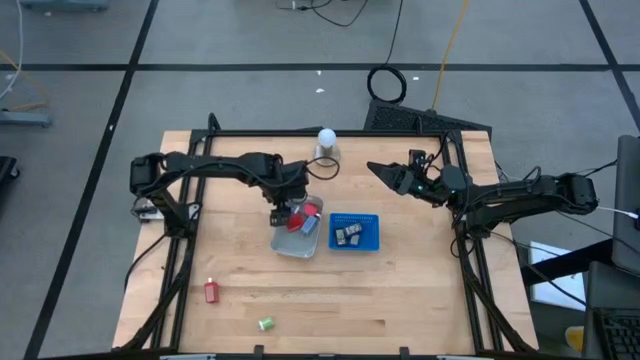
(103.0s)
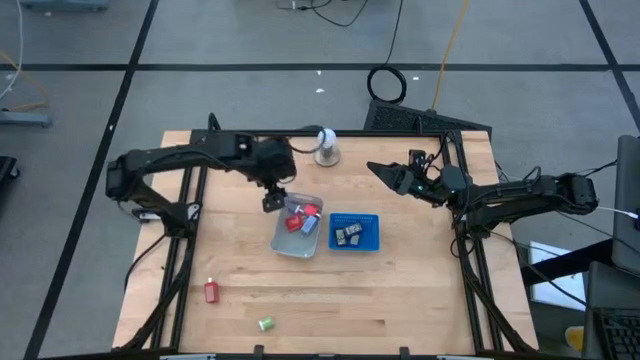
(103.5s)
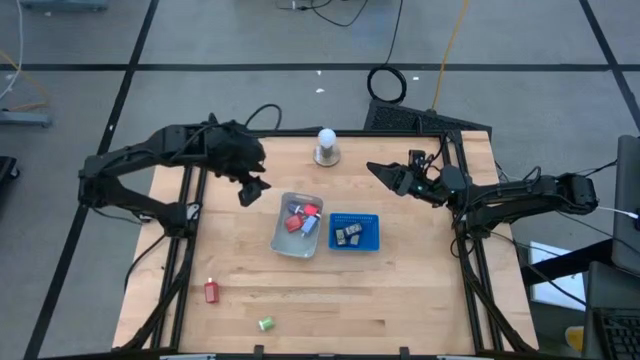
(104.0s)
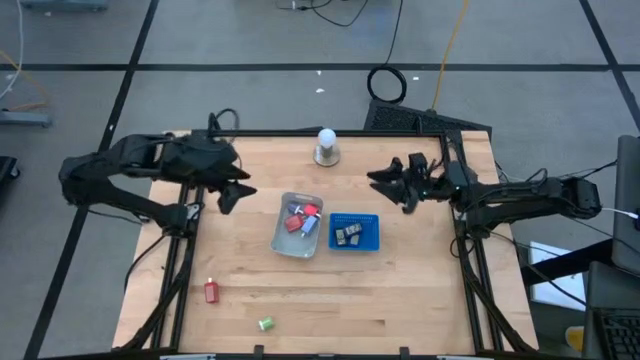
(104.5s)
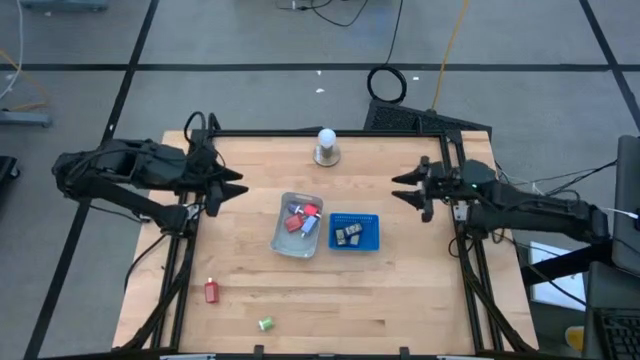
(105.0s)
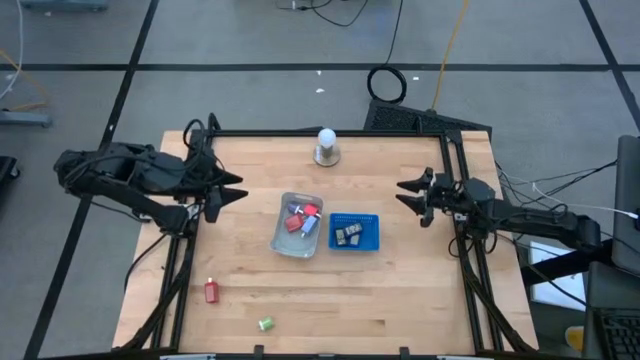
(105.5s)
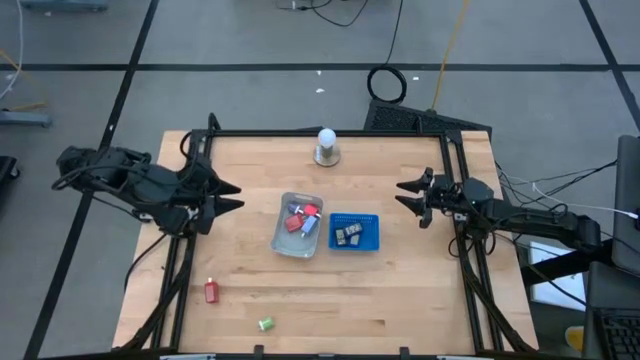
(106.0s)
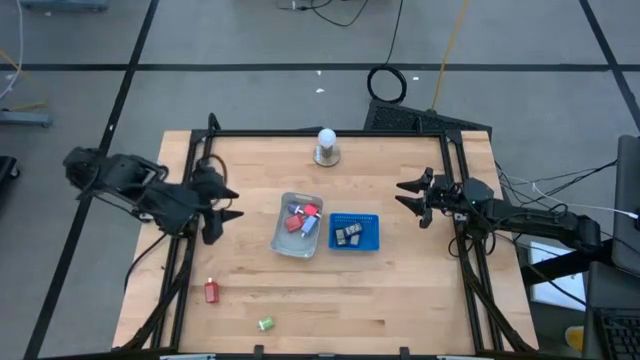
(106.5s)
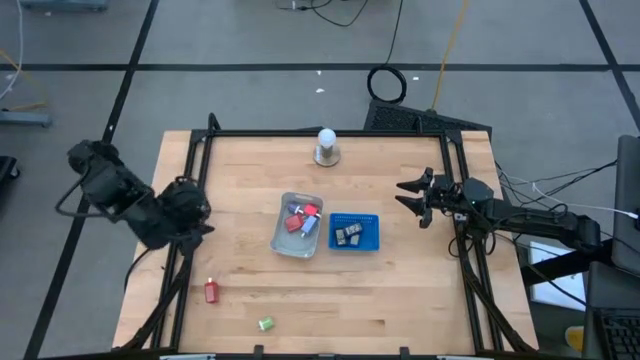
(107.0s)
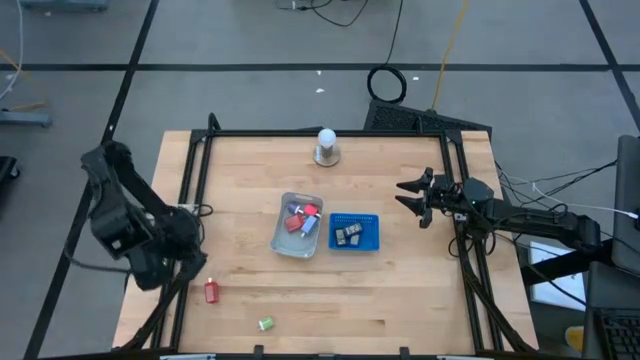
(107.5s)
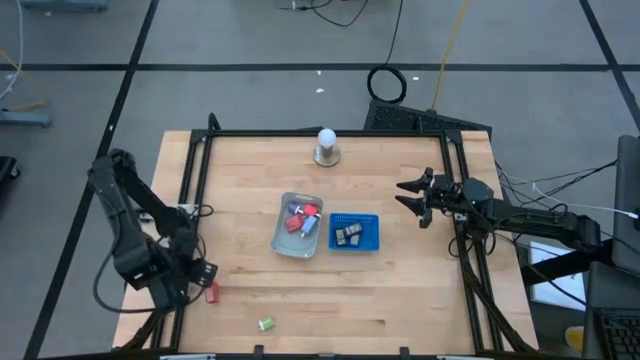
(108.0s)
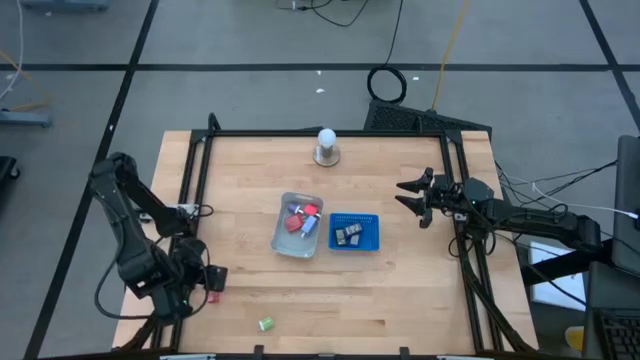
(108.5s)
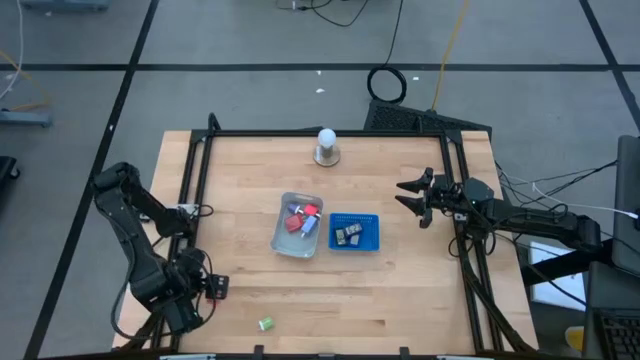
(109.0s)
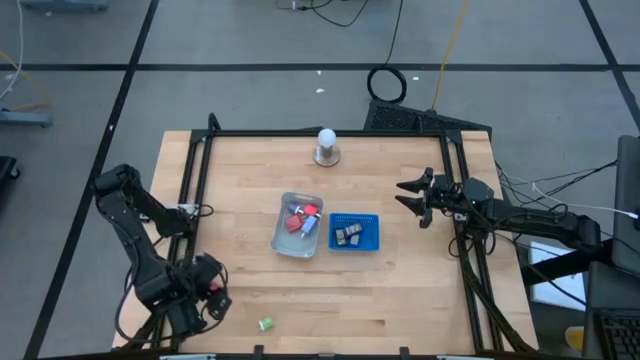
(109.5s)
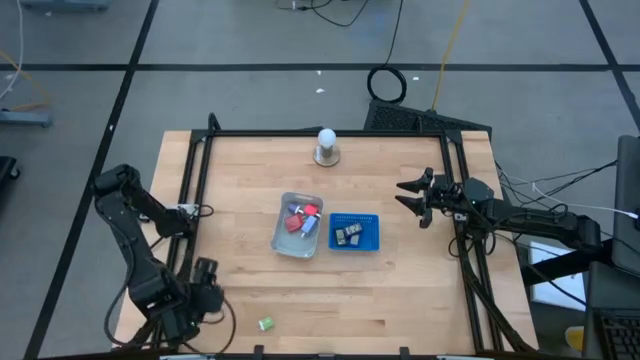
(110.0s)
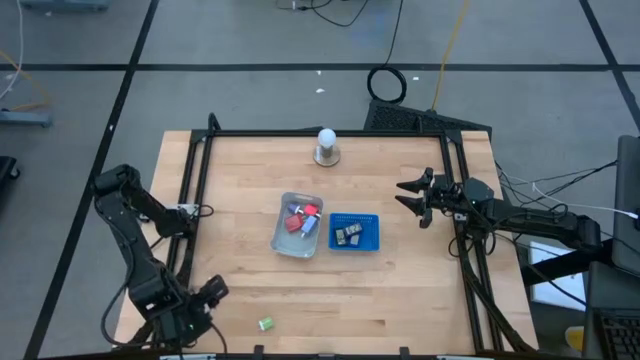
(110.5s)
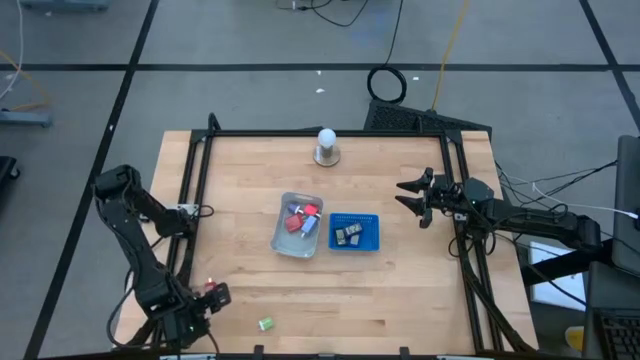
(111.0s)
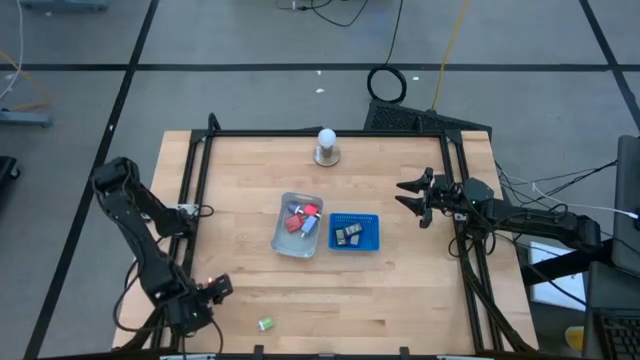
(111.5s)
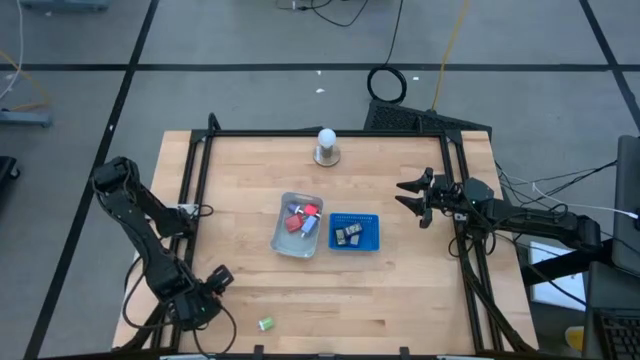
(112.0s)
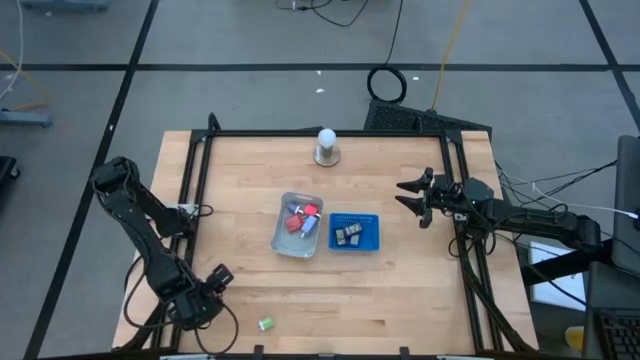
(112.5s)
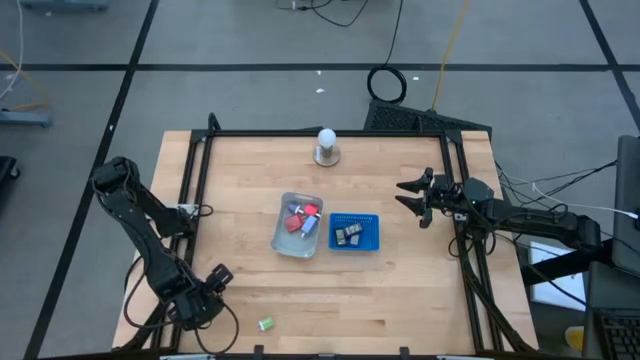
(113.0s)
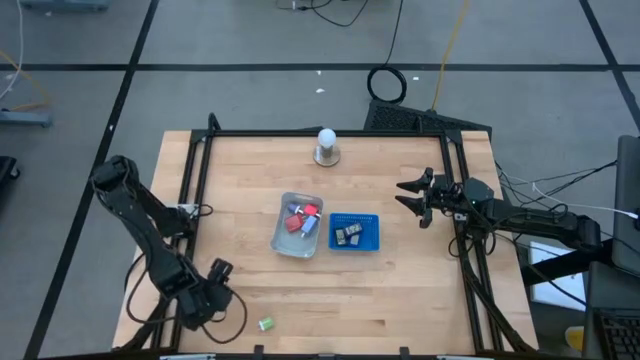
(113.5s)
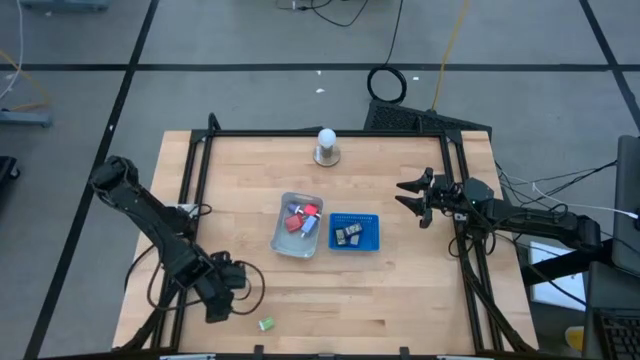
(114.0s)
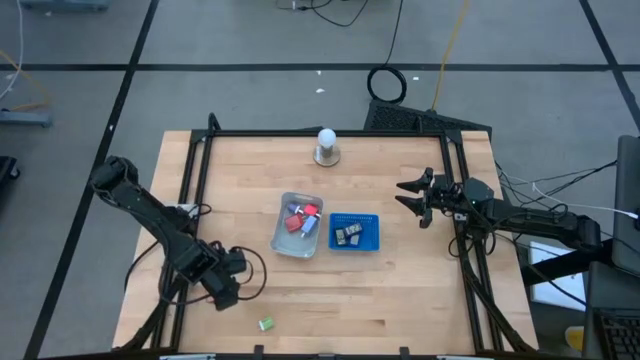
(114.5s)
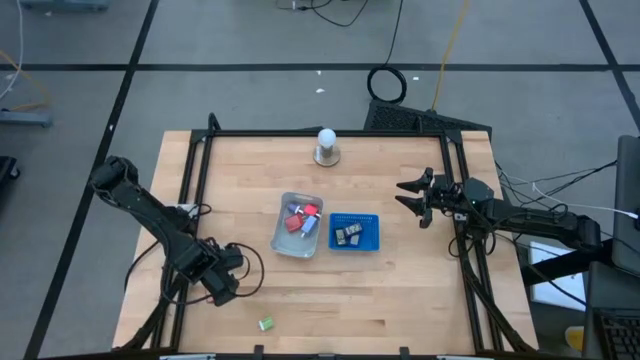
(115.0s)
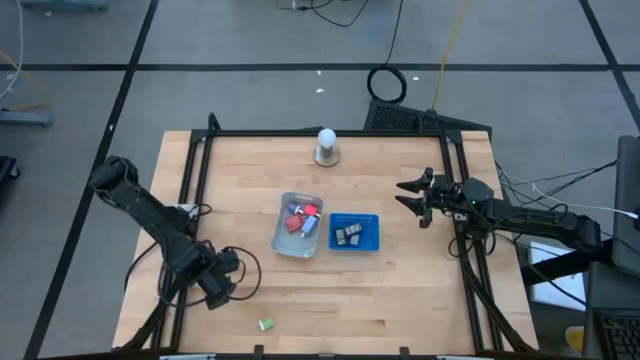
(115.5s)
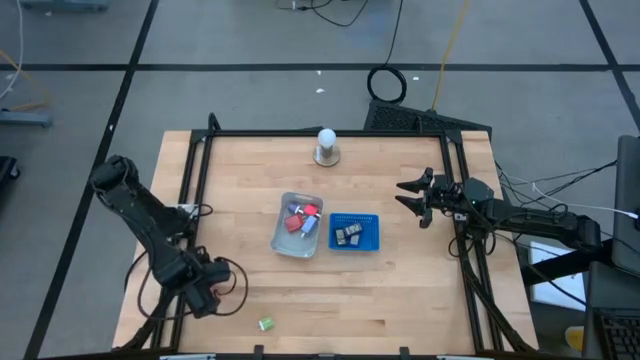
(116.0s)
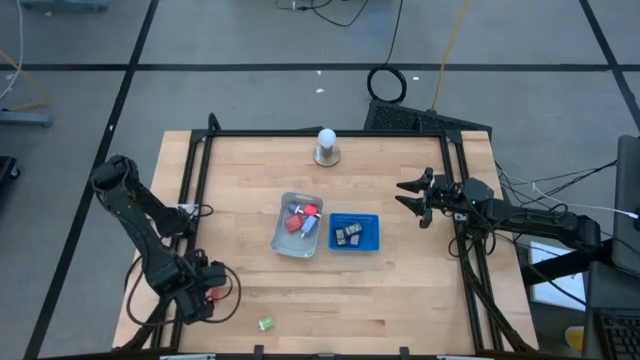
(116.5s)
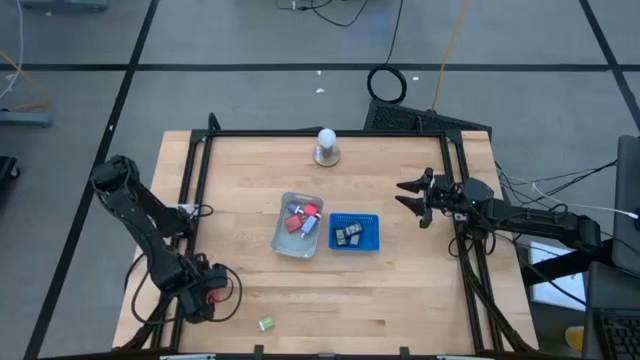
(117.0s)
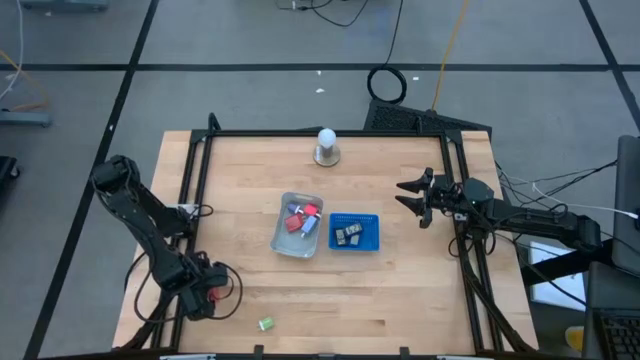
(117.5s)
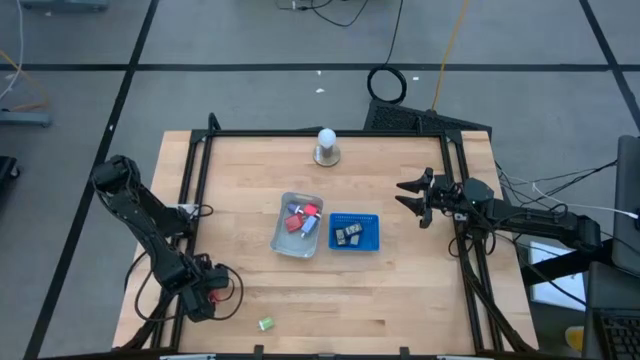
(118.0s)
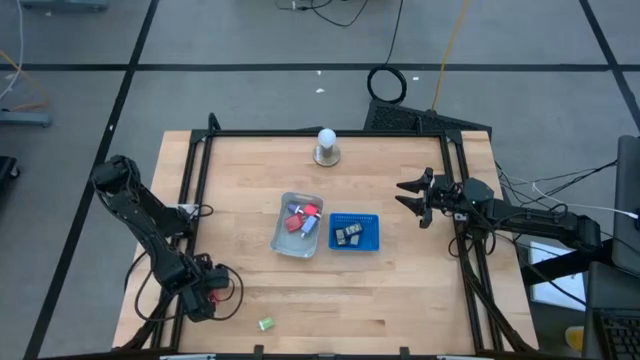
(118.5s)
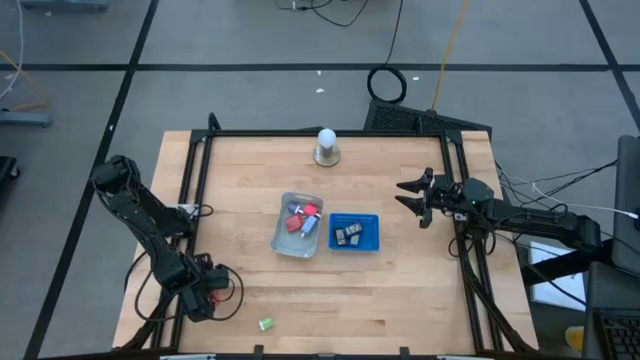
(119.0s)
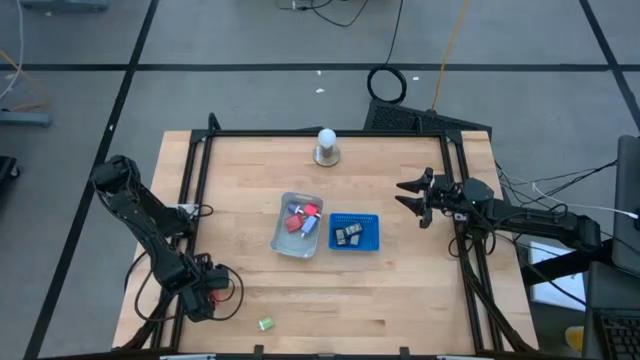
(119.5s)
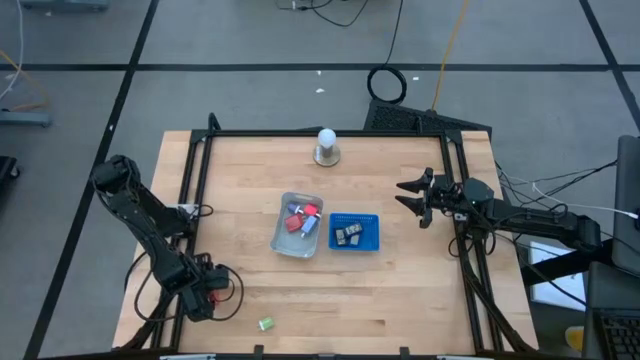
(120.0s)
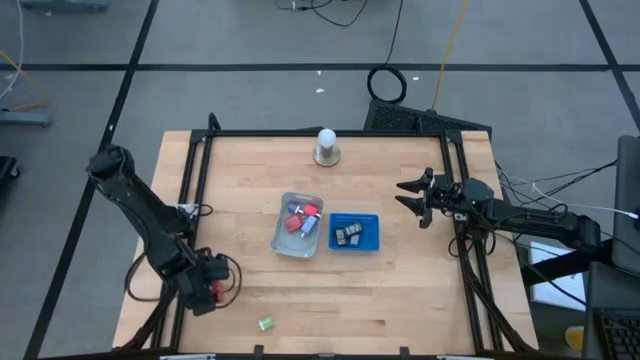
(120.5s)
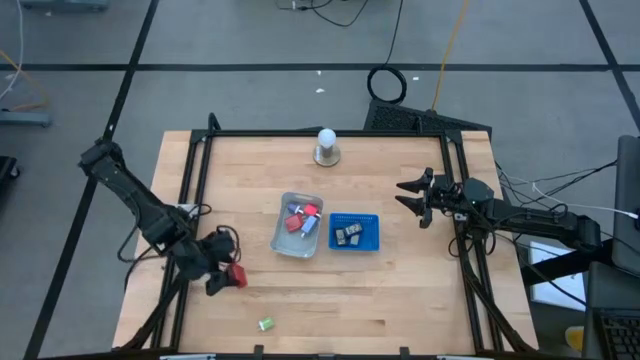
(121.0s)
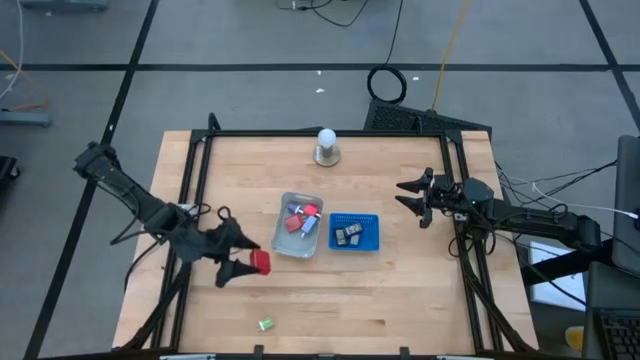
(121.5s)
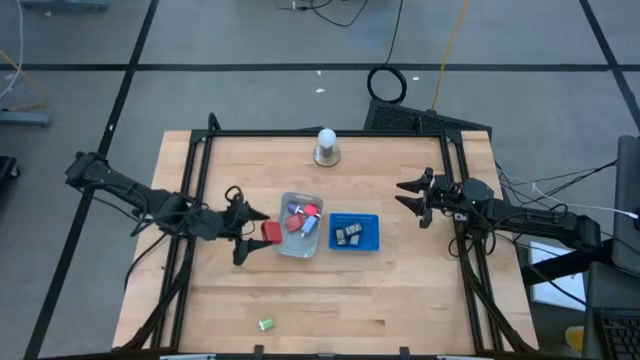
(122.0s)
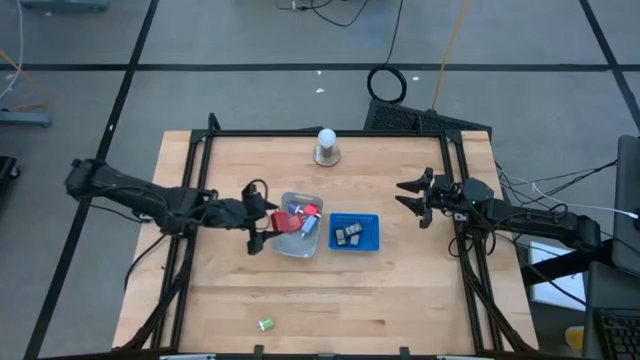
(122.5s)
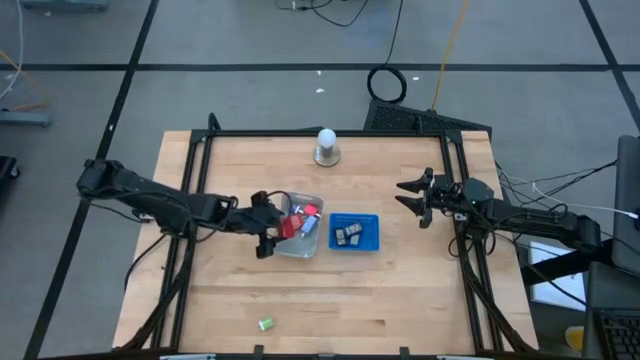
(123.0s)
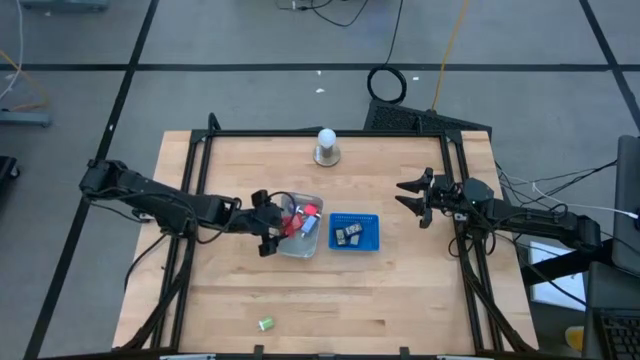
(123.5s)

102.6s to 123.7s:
Task: Pick & Place Office items
Put the red charger adapter into the gray bin
